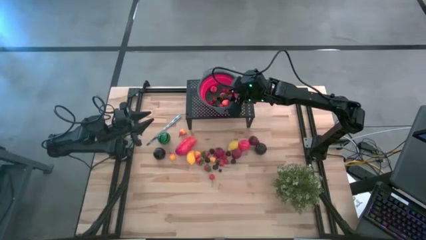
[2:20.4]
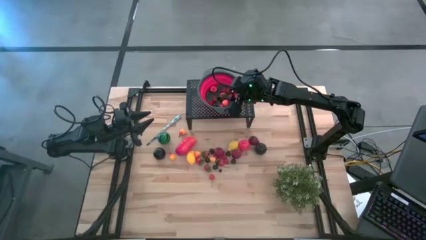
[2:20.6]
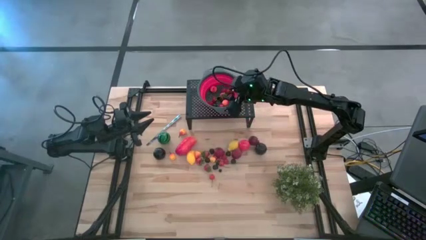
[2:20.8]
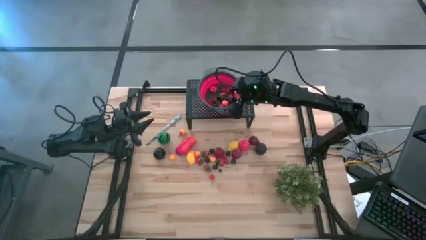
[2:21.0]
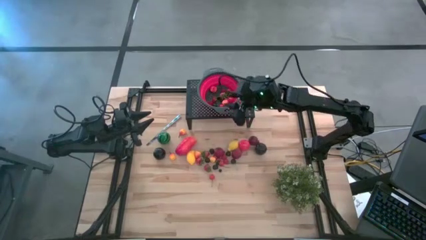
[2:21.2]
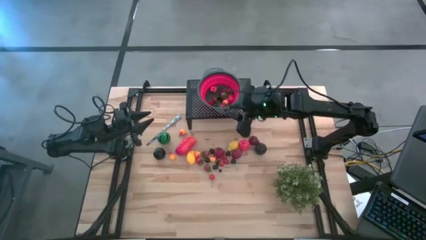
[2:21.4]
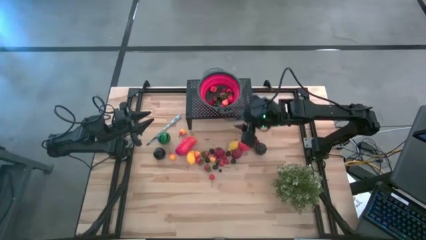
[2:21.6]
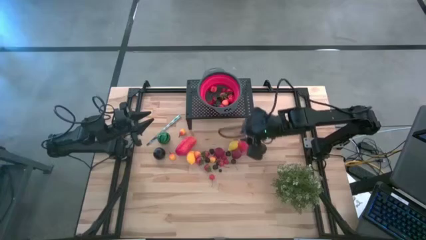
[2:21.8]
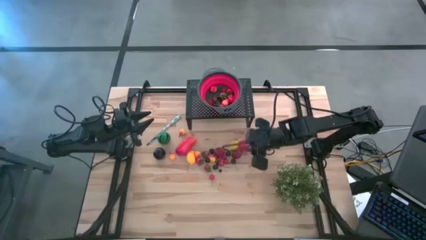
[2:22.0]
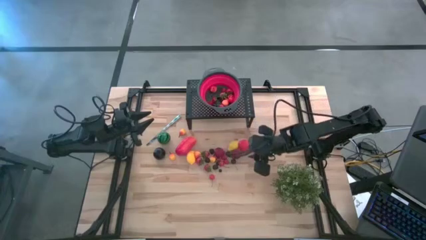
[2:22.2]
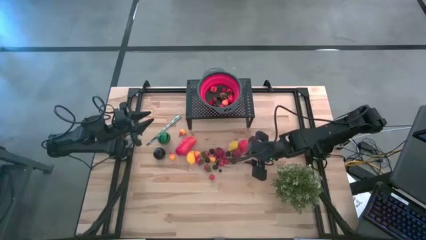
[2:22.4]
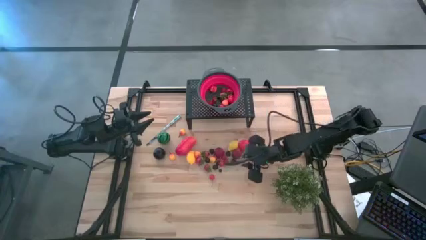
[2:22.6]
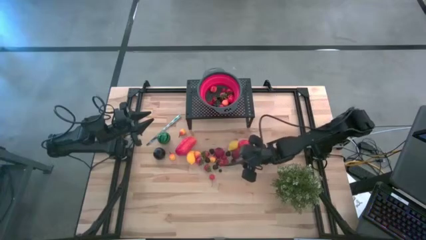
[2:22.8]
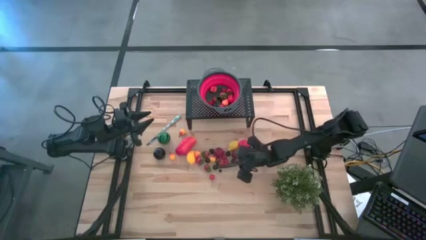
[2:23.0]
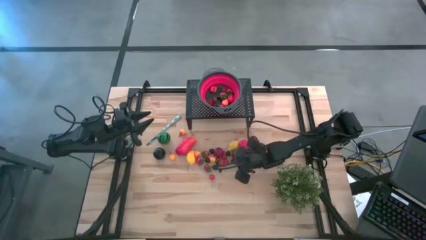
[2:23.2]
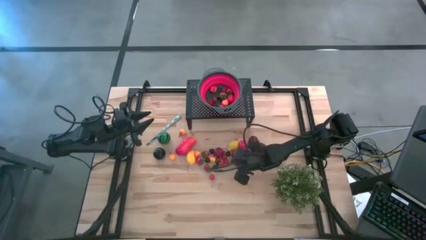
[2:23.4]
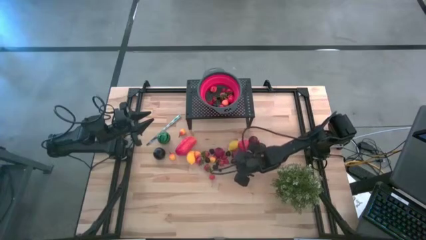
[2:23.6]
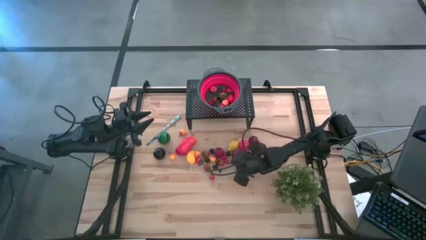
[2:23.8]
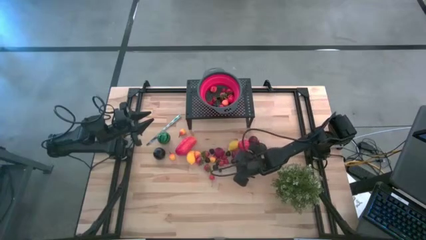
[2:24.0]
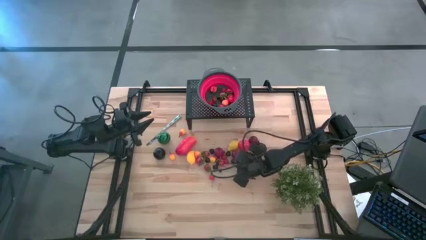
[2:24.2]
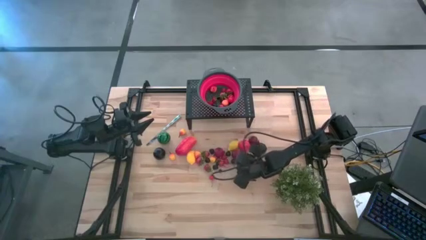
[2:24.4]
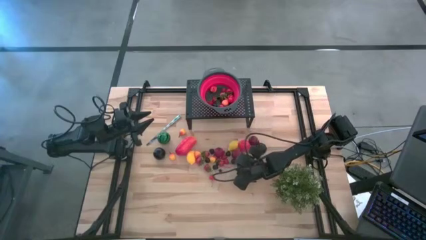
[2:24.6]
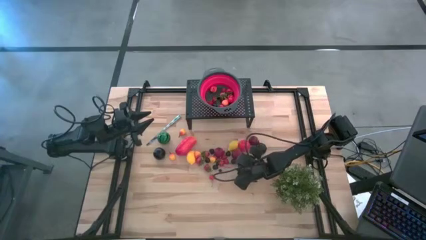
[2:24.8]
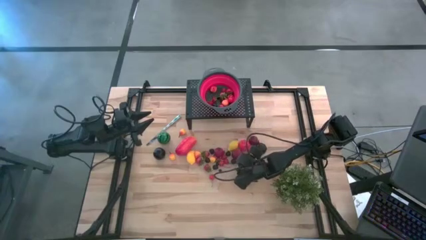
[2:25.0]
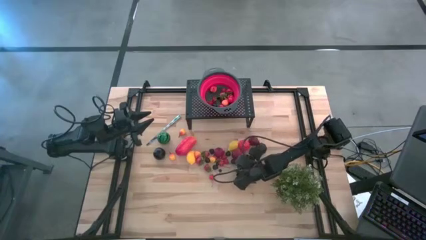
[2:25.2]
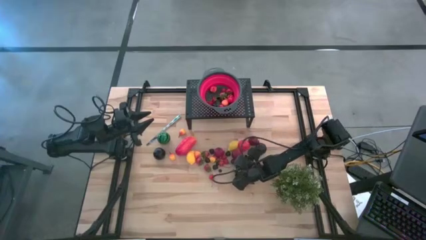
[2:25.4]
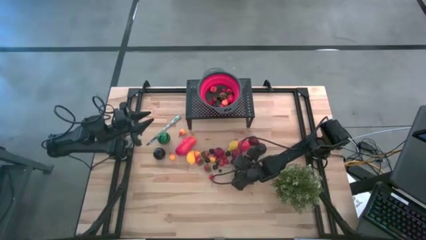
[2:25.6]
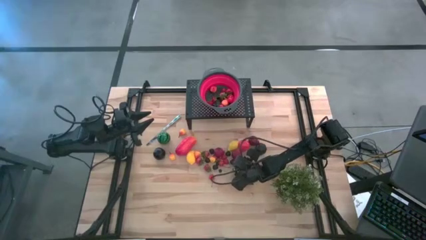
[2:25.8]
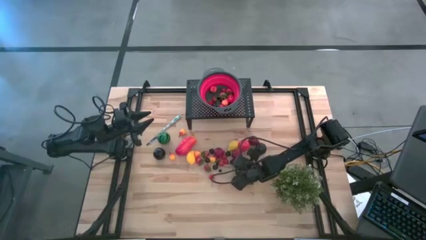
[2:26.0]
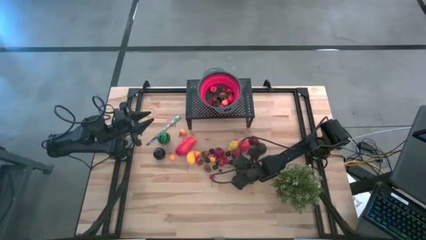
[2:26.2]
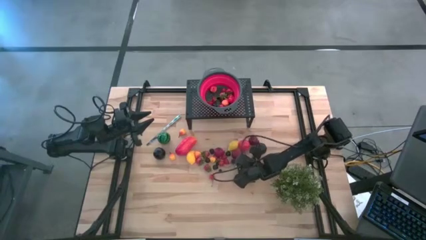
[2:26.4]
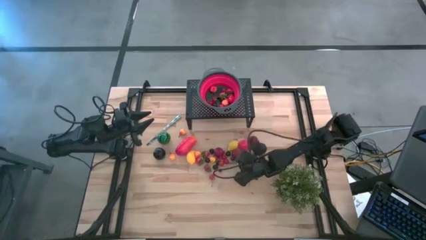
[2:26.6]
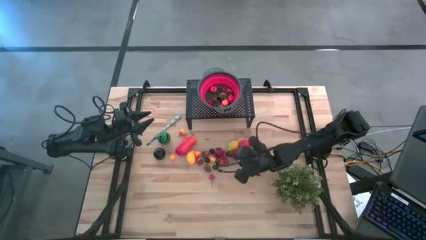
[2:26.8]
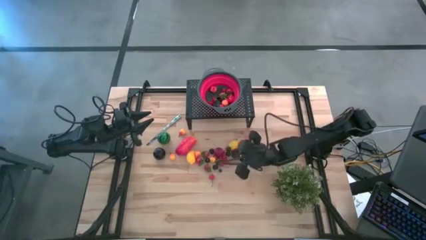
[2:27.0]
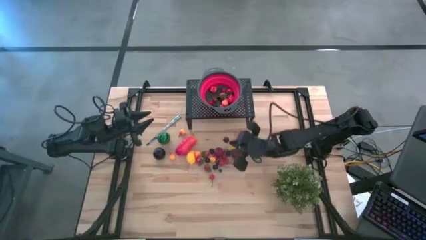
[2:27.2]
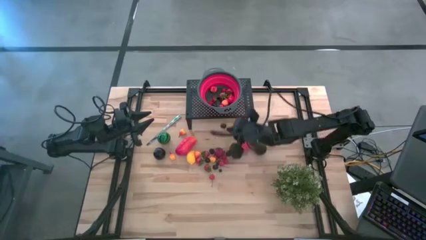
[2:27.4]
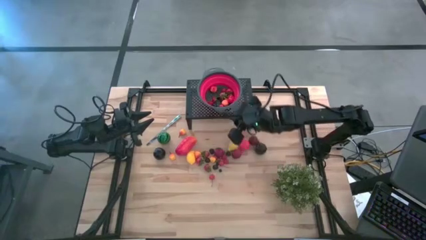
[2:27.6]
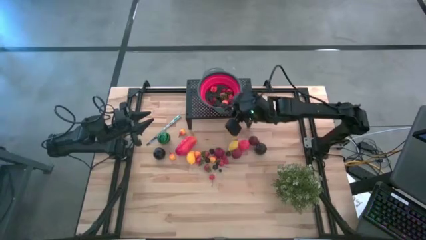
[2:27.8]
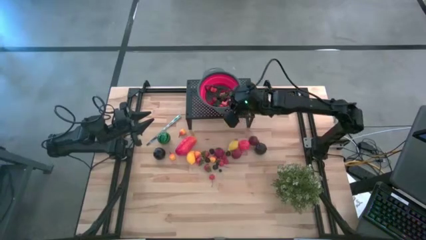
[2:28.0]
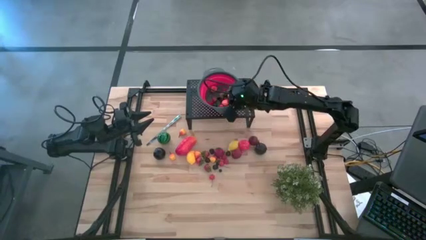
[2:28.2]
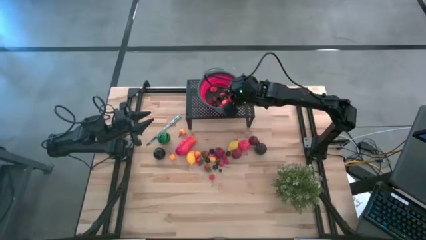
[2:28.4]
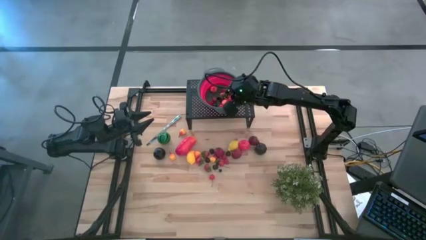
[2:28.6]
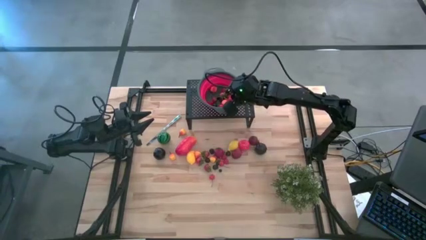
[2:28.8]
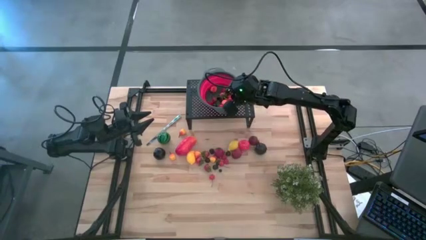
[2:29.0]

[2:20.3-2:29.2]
Task: Pick & Place Fruit
Put the black cherry in the red colander on the shelf

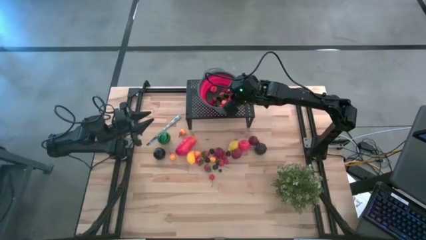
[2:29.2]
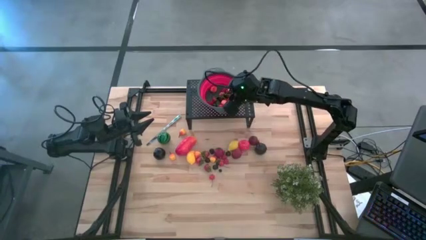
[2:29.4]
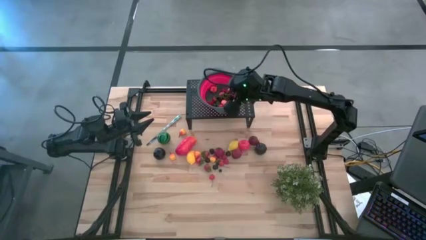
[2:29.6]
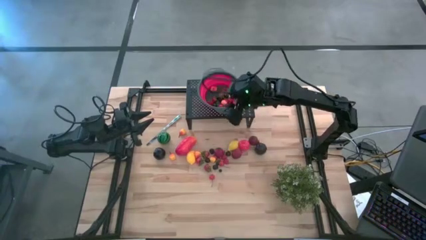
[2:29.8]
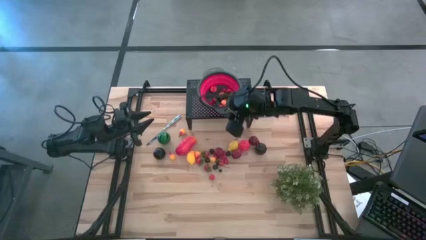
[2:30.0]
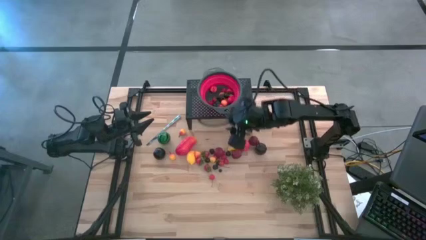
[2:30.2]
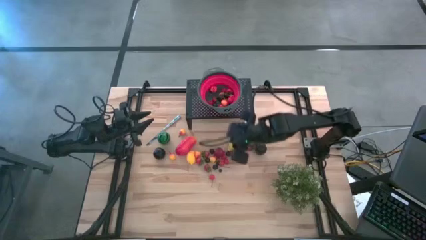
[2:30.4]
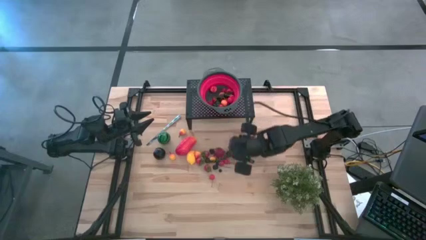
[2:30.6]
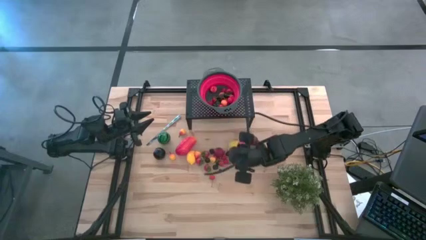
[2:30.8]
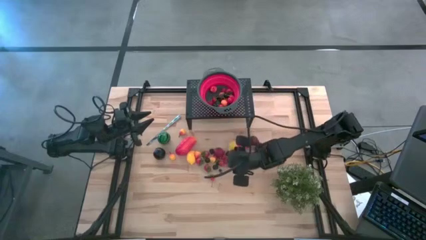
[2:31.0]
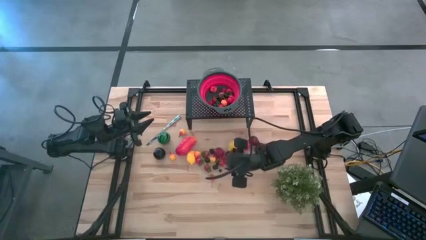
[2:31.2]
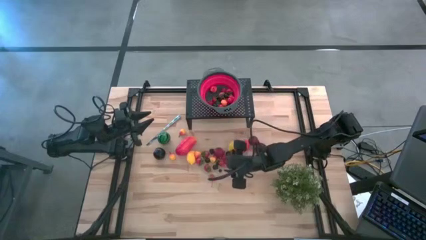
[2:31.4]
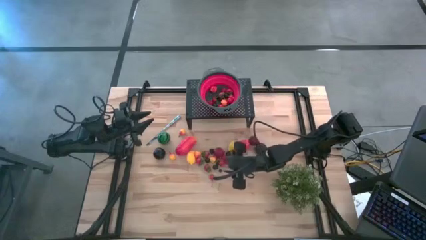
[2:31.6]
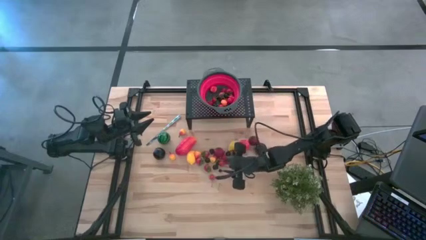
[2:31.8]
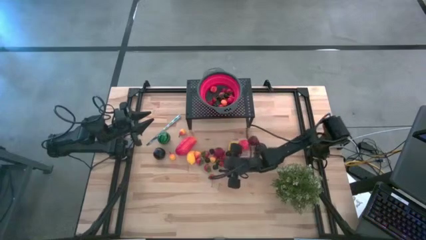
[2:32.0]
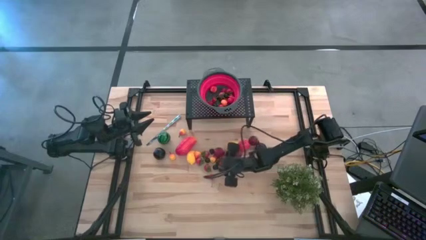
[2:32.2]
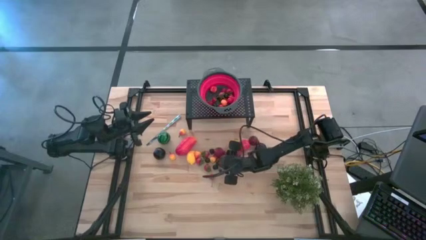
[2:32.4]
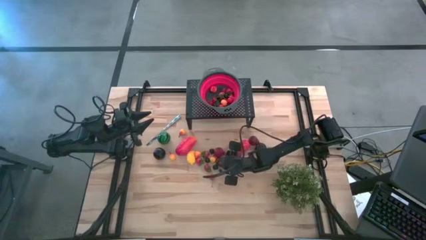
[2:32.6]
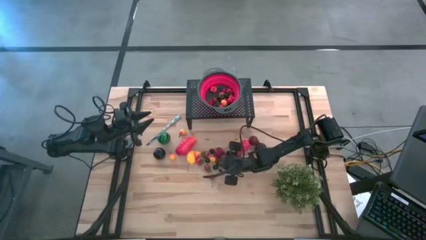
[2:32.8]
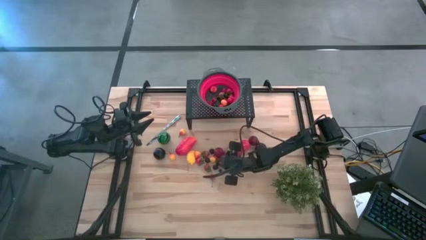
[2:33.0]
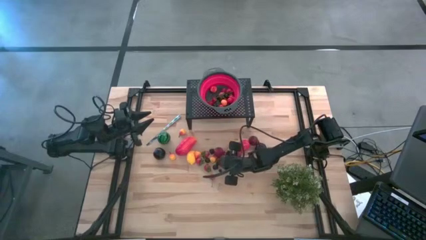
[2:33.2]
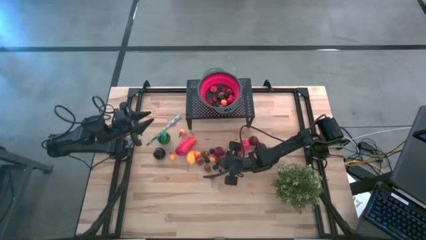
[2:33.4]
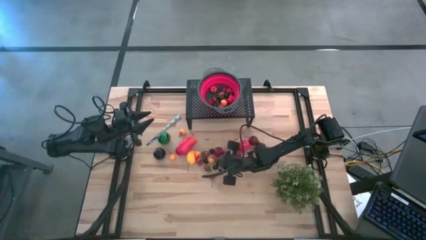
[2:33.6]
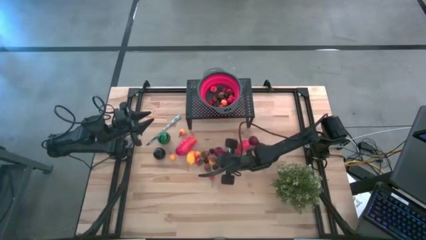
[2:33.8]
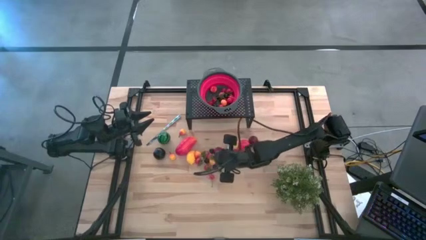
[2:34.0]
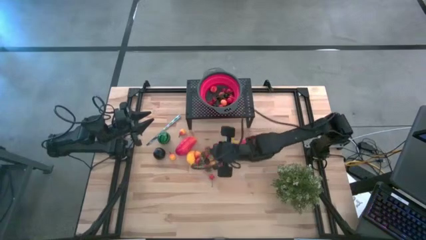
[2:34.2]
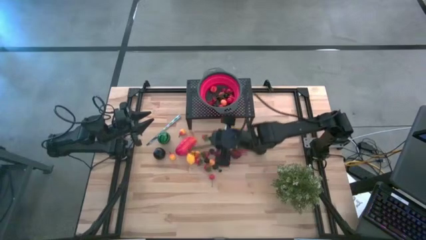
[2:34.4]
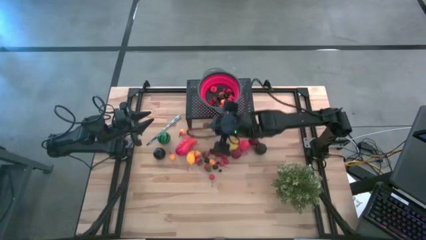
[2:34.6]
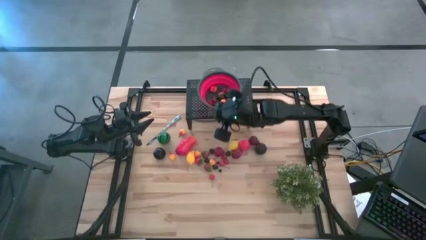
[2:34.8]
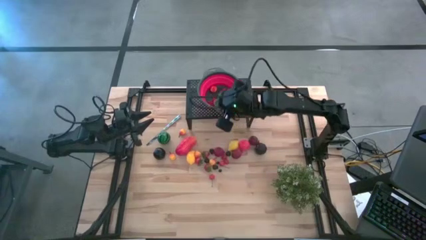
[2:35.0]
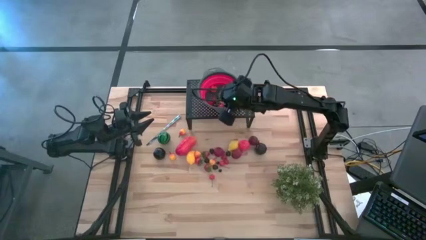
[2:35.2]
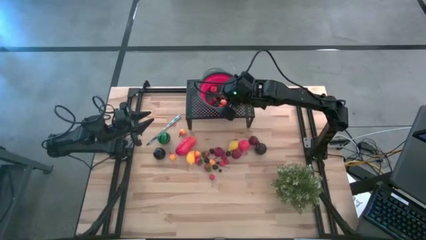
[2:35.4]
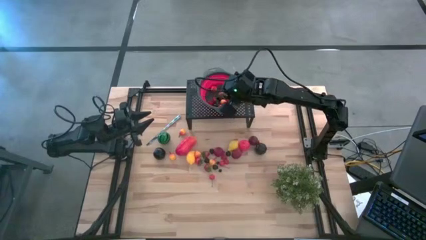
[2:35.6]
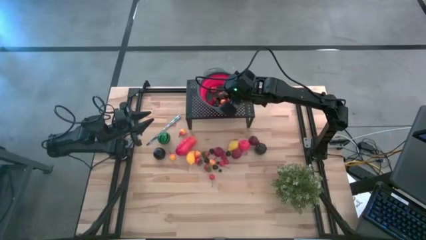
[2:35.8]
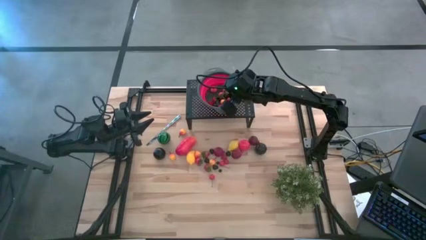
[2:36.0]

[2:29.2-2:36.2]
Put the strawberry in the red colander on the shelf
